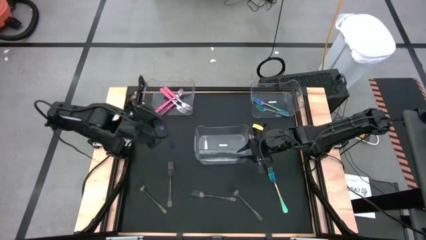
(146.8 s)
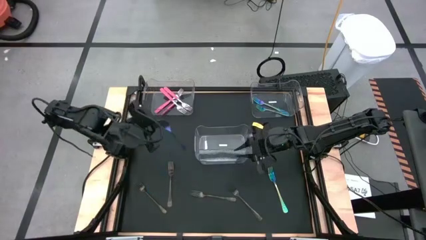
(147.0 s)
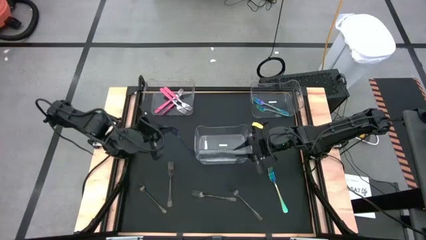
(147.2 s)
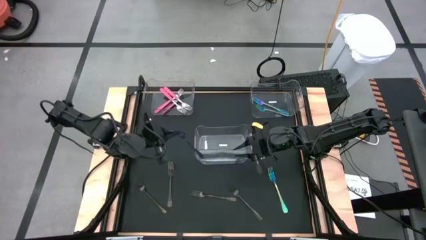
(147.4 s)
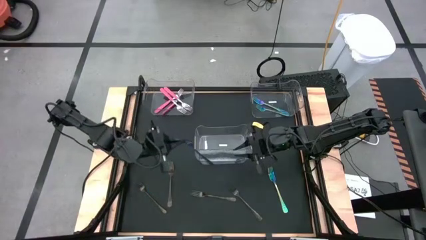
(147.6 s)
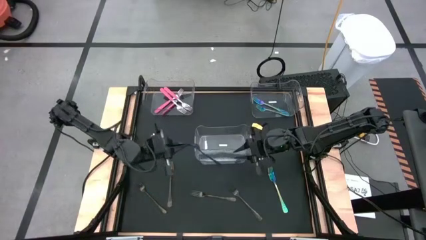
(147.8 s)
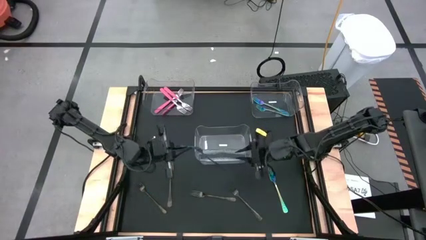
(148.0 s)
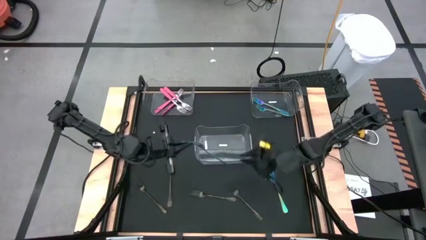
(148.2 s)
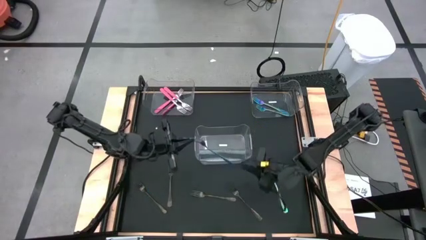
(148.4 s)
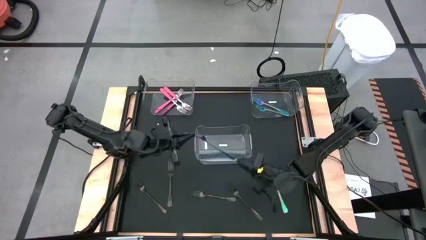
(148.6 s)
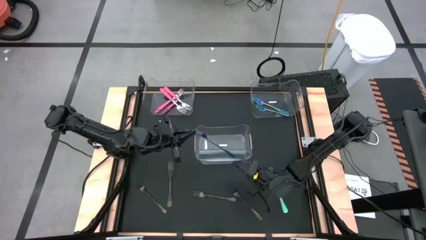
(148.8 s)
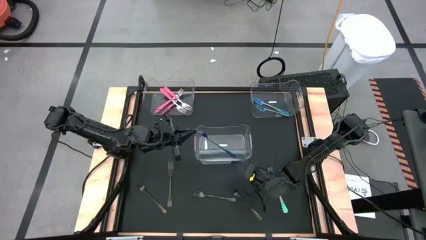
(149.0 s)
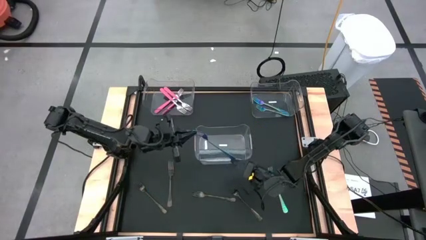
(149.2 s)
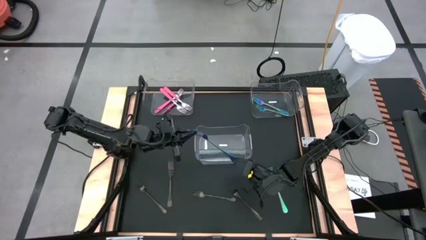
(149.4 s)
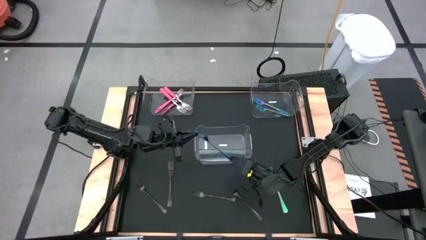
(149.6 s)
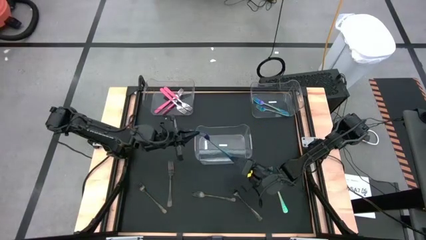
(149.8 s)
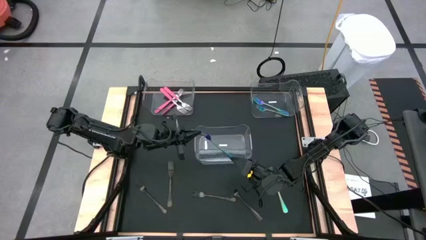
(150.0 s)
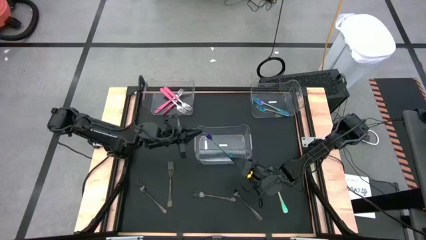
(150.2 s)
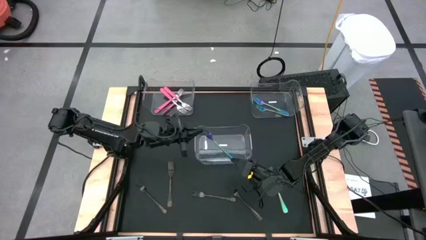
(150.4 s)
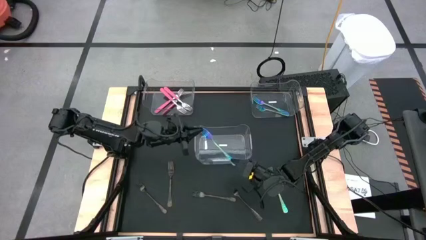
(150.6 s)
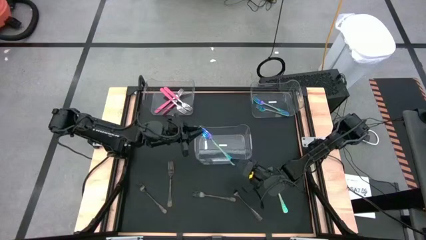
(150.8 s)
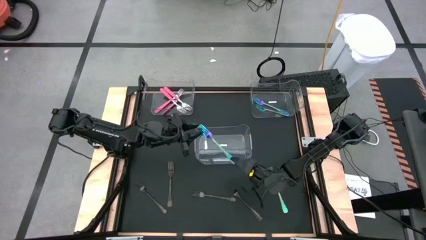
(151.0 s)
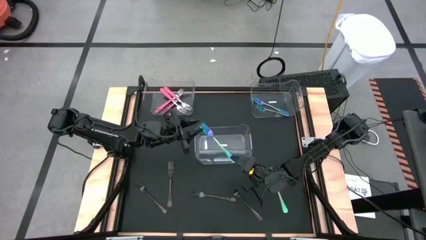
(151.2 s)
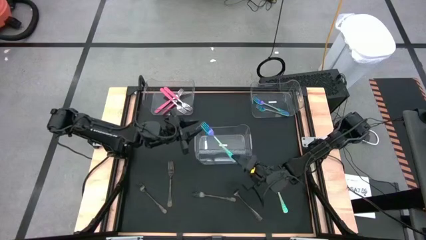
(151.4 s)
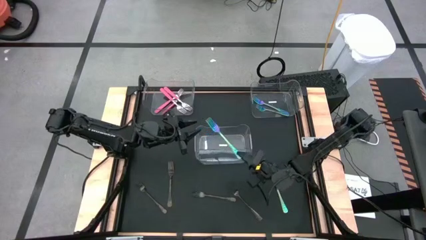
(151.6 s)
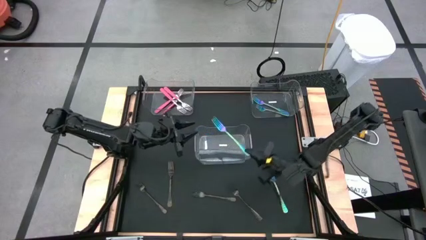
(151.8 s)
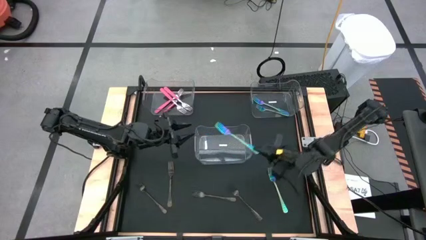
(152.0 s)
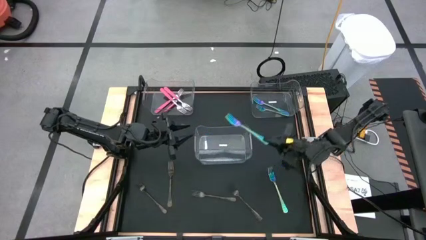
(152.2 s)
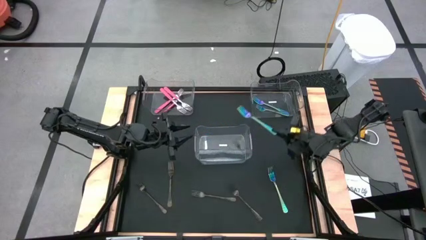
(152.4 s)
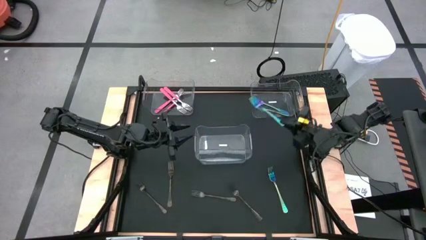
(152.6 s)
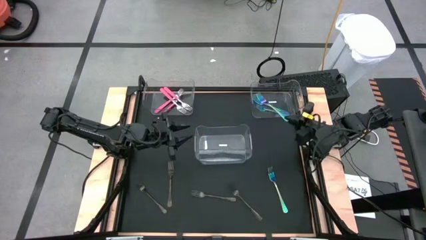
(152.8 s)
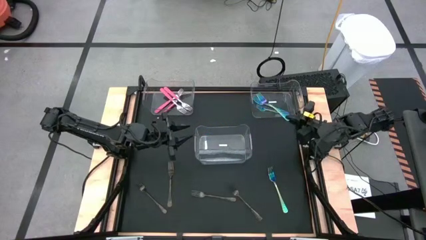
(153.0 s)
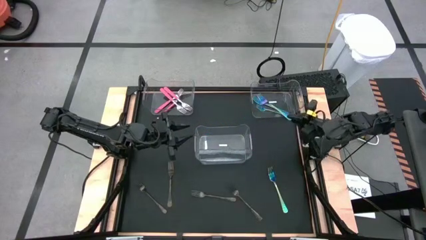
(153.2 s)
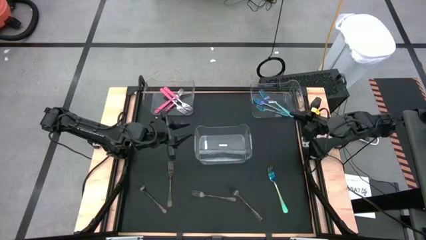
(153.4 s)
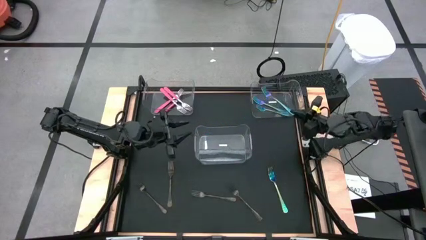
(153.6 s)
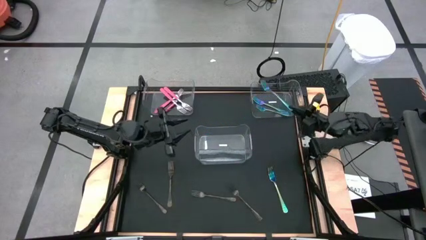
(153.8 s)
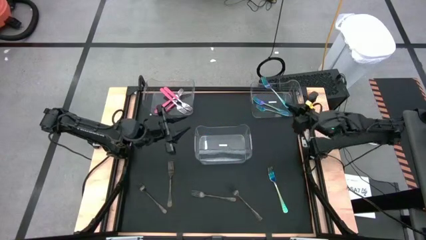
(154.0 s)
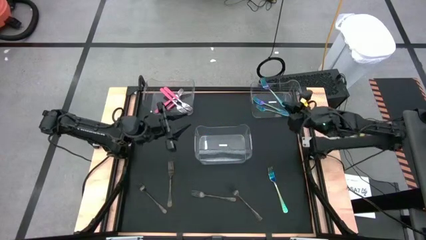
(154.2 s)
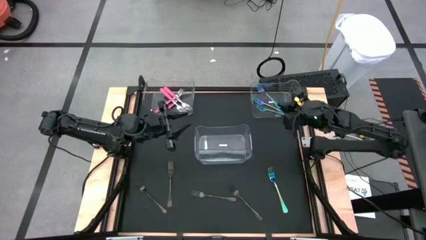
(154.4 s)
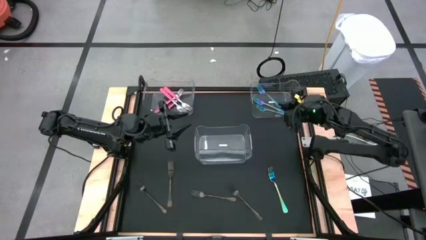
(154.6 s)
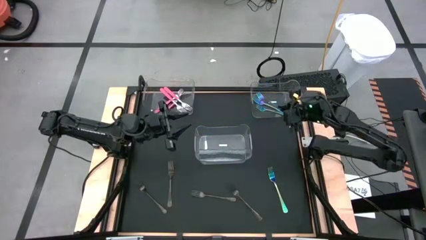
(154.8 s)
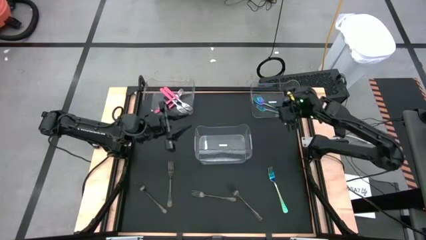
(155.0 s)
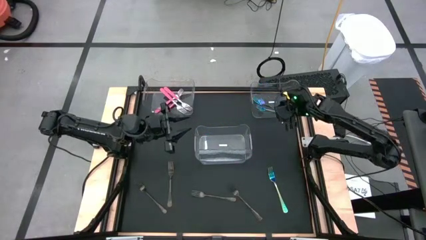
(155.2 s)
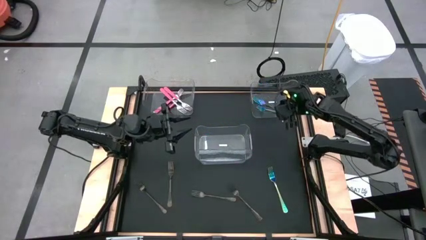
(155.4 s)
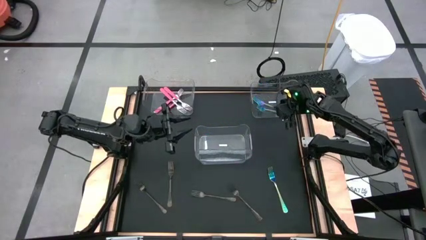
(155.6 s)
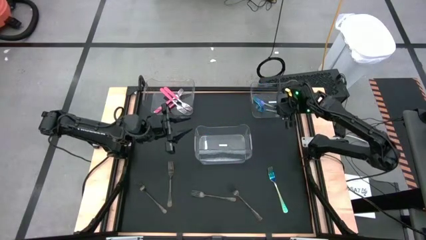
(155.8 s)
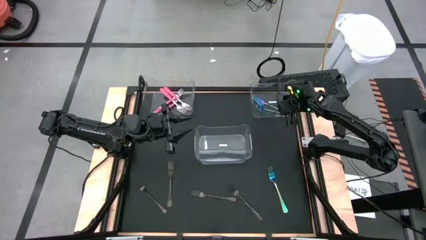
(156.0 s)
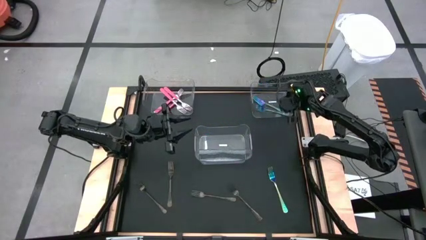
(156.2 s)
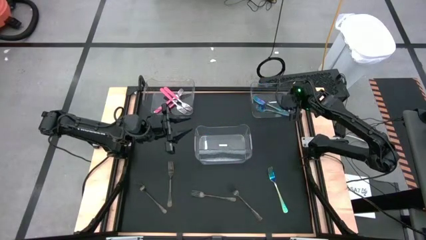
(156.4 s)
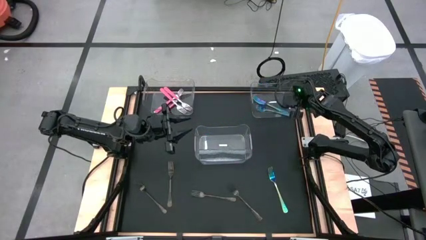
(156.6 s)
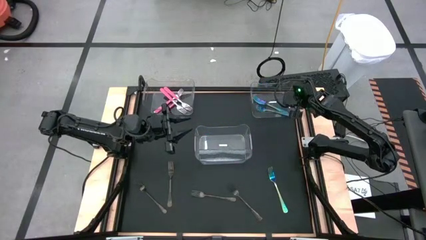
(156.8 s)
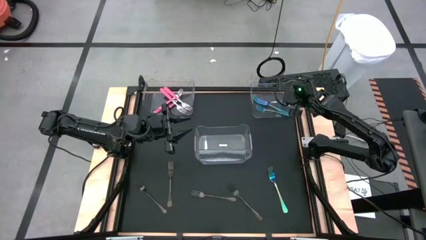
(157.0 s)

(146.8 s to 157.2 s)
Task: Sort silverware by color (type)
Put the blue fork into the right transparent bin

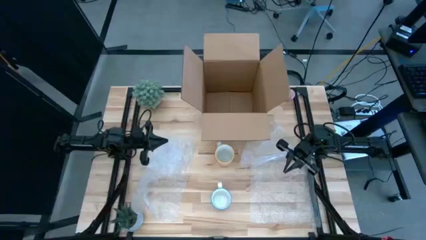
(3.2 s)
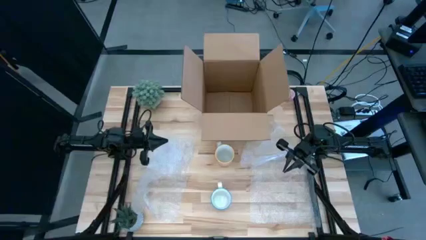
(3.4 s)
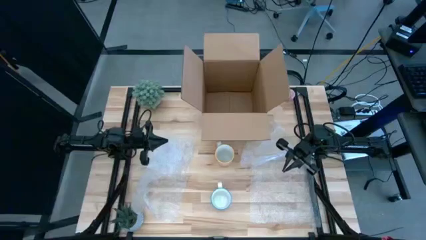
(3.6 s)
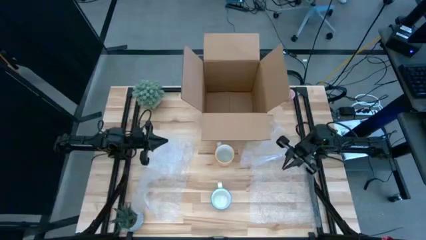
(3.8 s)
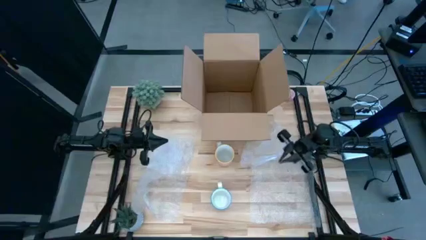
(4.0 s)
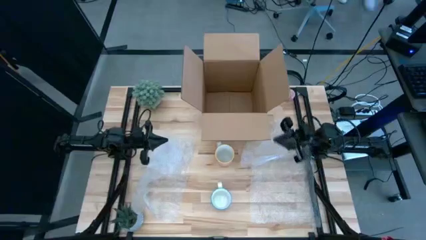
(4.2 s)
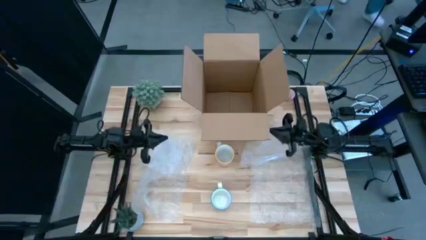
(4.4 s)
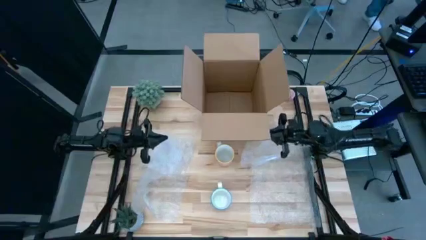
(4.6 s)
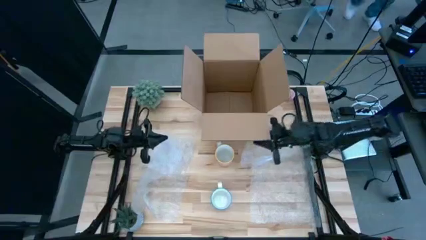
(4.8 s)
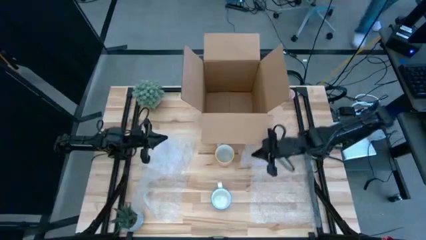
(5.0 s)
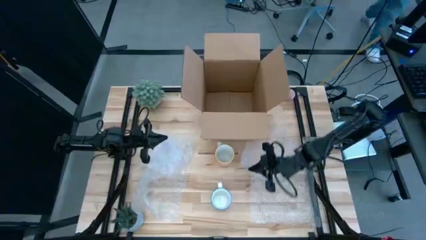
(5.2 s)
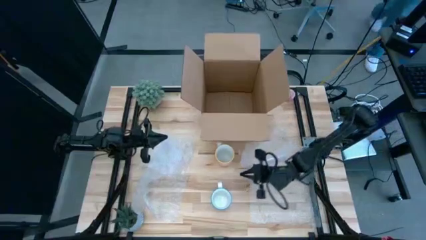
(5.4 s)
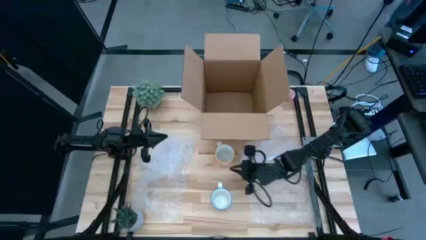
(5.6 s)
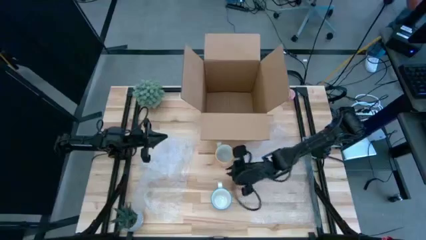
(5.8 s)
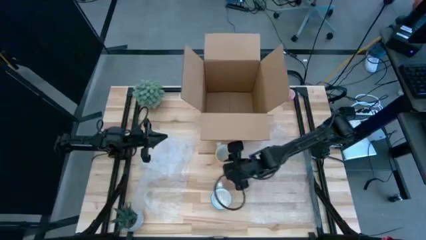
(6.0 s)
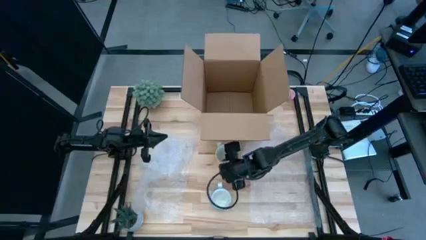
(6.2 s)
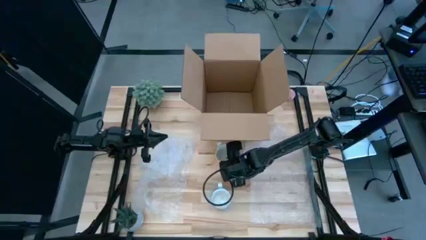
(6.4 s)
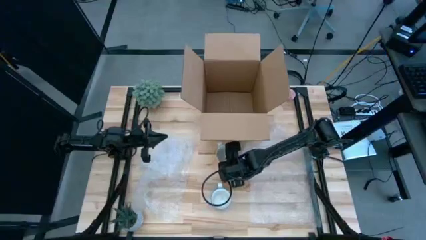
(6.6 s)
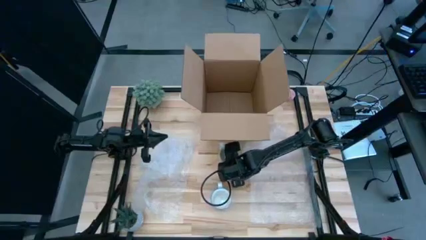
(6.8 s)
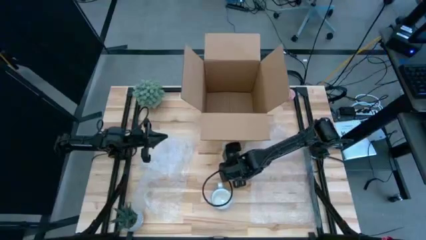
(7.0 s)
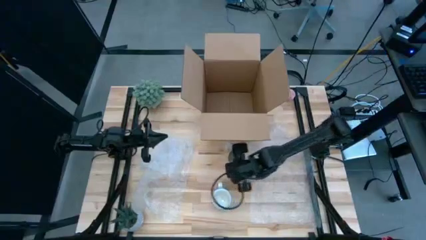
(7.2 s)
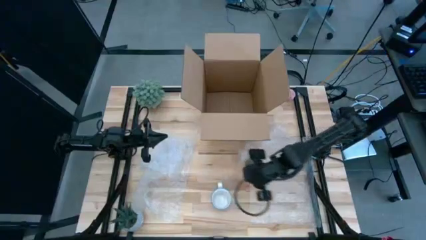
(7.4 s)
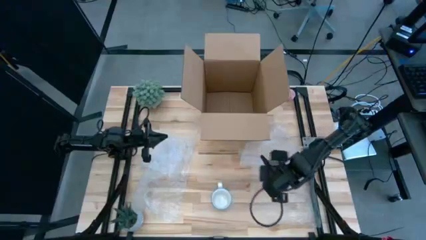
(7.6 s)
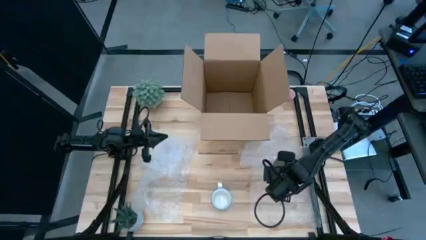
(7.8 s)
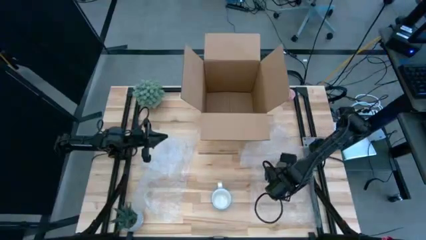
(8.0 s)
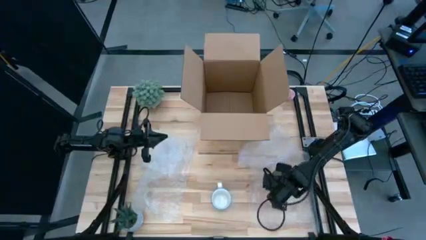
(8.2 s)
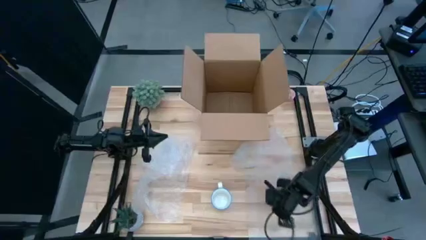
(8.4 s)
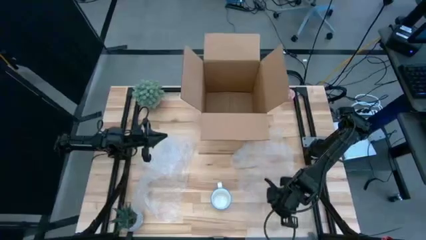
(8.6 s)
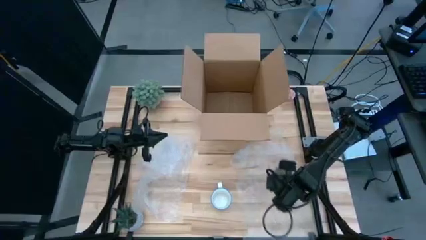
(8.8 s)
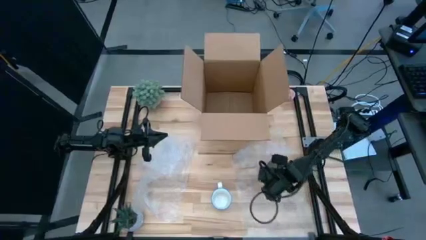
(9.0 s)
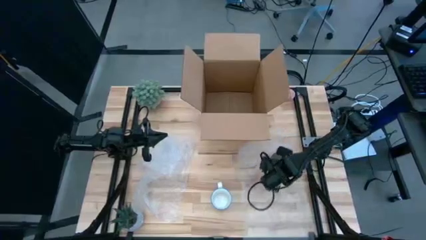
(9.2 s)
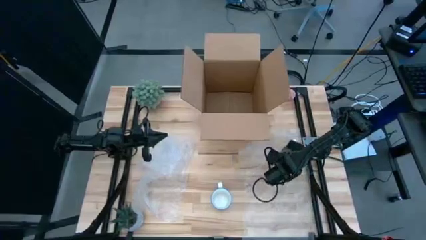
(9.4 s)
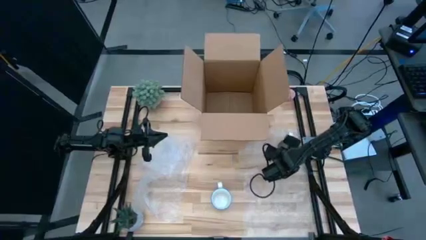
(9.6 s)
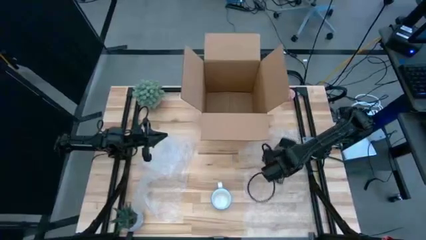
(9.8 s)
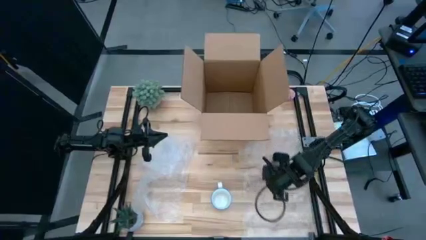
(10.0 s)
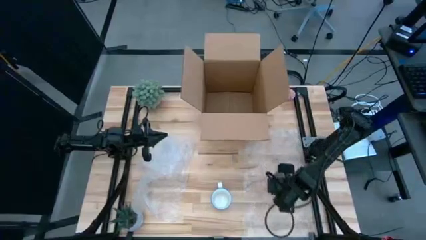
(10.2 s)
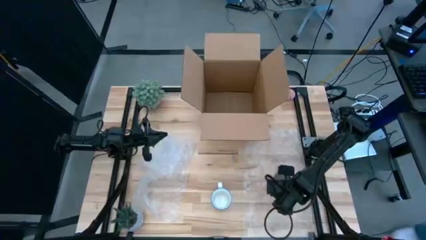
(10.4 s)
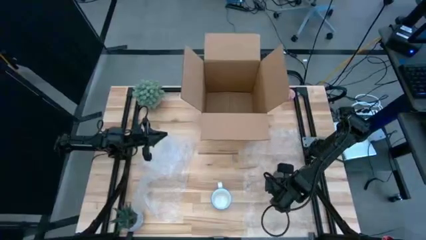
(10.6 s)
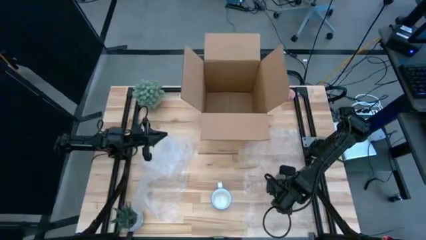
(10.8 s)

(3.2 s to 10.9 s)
Task: wrap mug
Put the yellow mug on the bubble wrap
